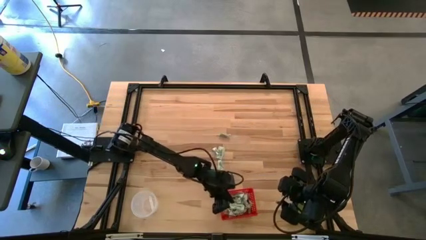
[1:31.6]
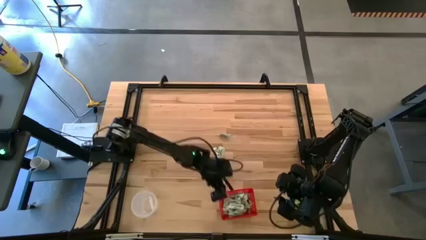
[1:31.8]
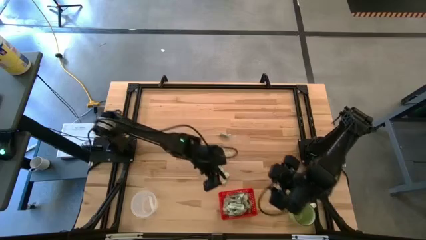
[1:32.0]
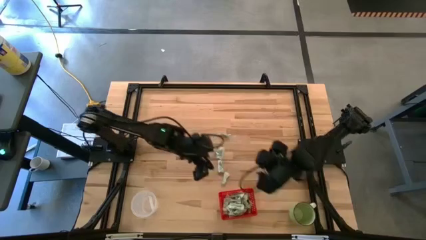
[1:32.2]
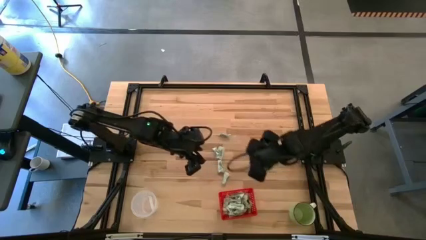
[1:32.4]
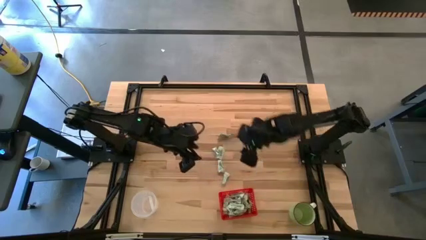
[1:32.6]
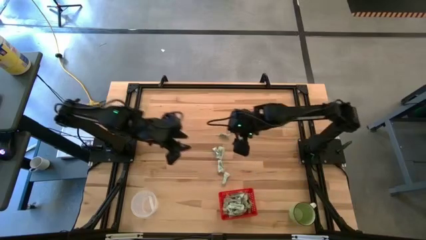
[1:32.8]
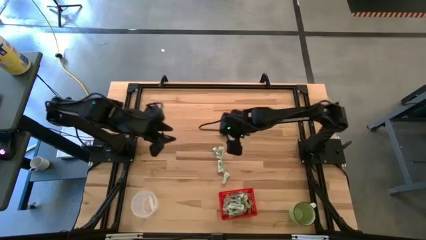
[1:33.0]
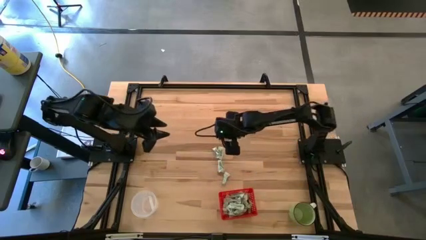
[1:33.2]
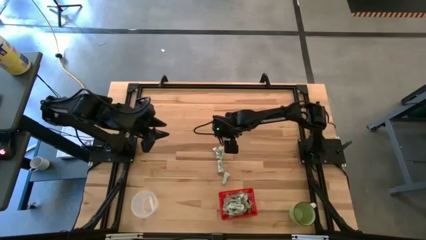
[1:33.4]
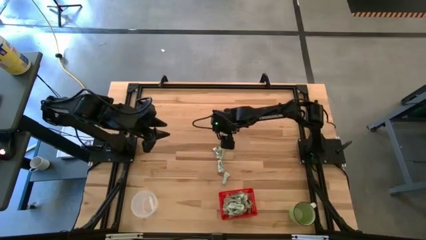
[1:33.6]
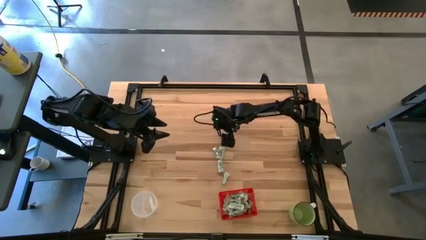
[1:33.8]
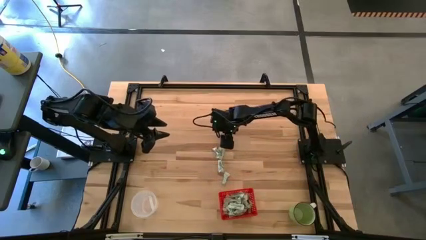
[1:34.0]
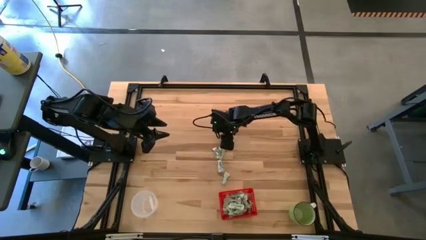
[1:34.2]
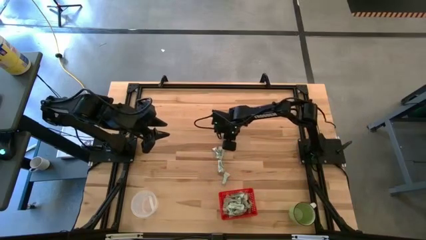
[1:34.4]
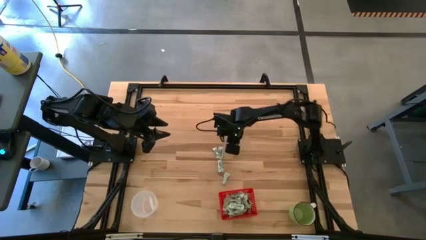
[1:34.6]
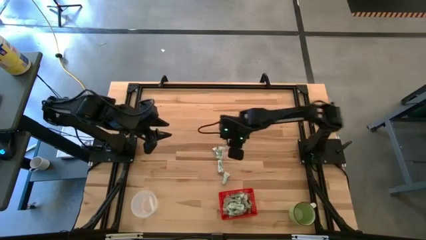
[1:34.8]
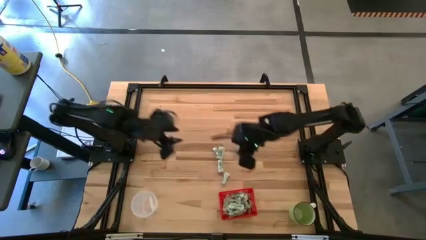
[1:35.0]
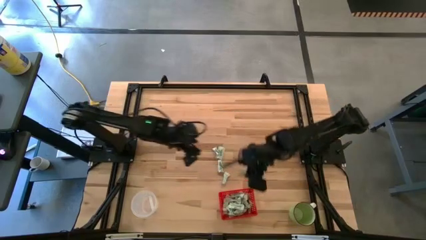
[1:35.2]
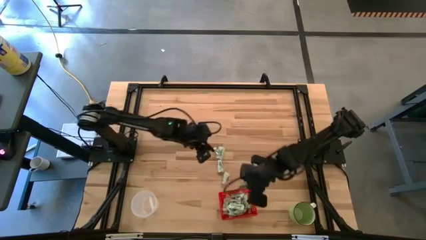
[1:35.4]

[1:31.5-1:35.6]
Task: Pick and place items into bin
Put the white stevia packet into the red bin

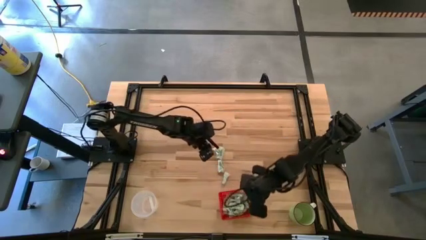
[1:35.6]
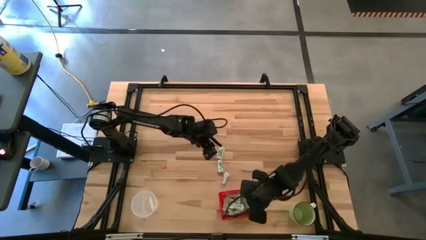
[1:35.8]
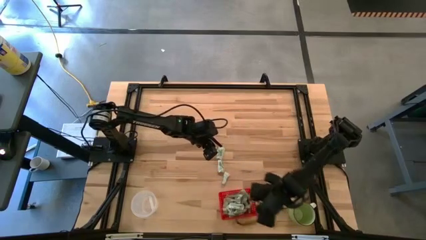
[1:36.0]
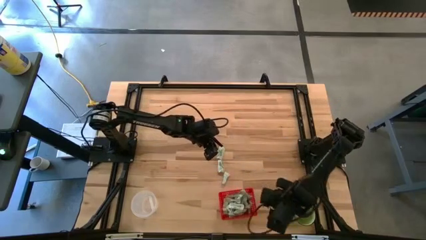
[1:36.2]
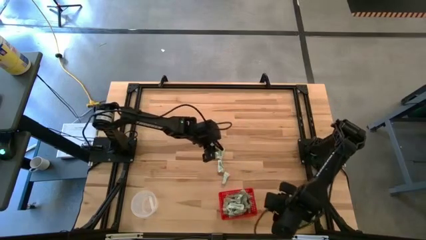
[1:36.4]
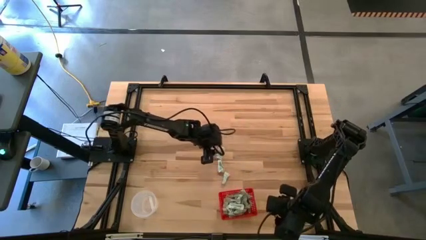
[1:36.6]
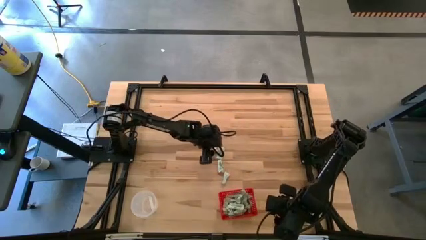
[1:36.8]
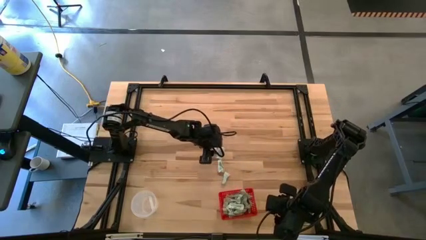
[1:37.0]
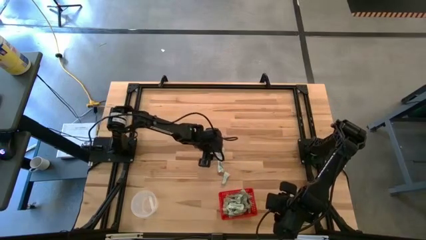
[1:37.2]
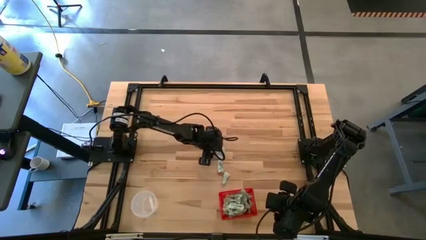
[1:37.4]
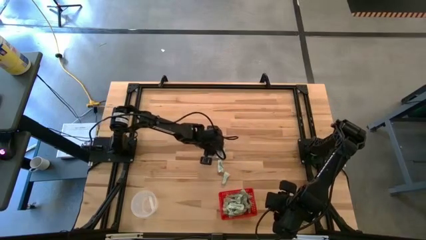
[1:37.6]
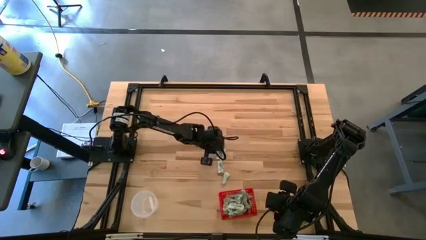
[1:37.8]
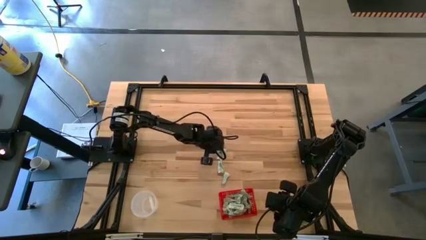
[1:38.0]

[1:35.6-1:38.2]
Put the white stevia packet into the red bin

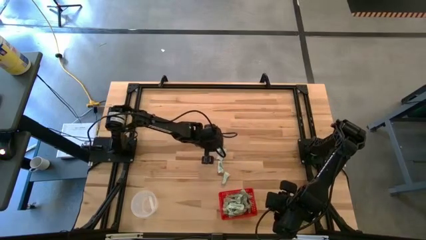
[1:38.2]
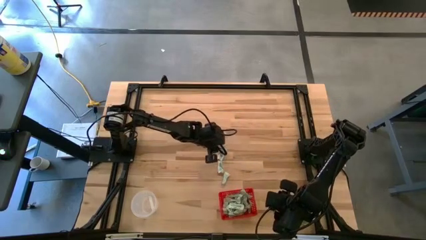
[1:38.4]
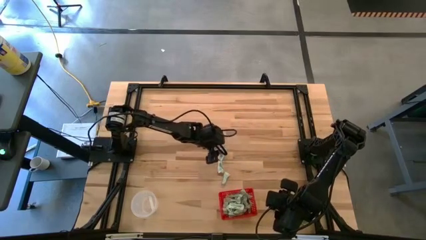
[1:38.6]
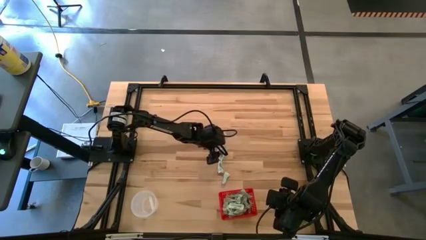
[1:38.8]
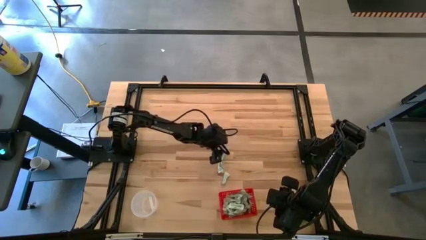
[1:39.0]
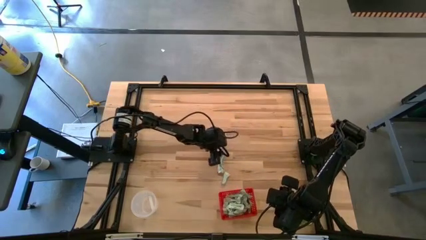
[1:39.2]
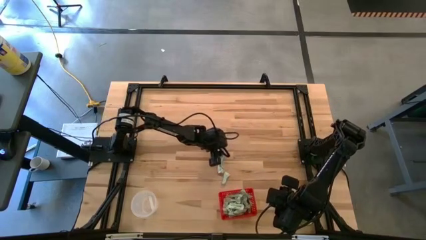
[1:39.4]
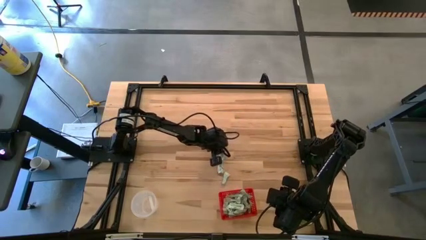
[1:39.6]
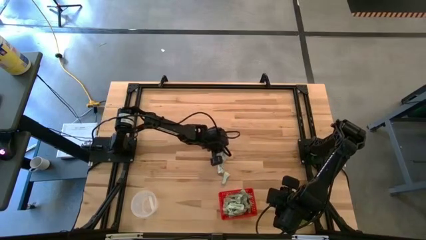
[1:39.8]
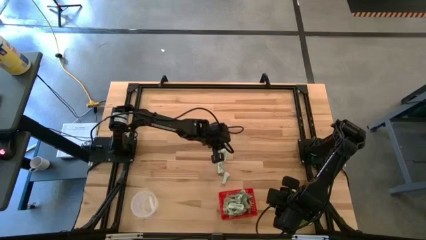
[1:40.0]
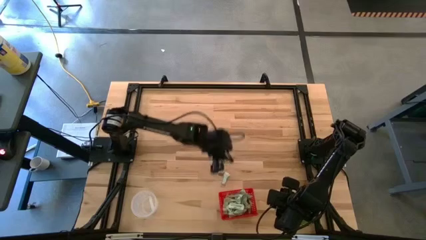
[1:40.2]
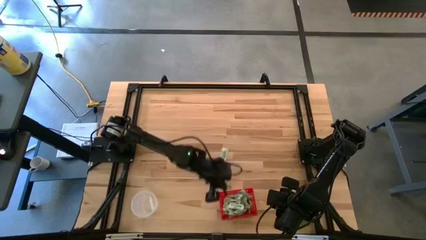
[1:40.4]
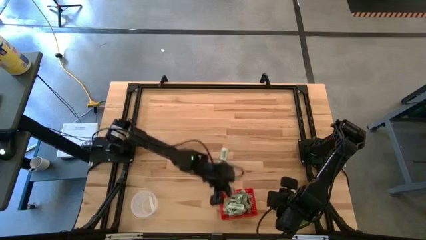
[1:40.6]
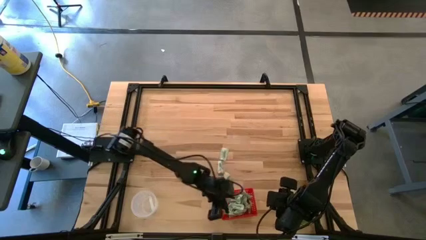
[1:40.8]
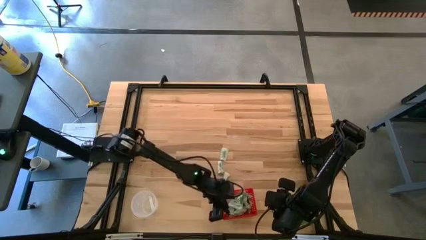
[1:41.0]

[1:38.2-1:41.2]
Put the white stevia packet into the red bin

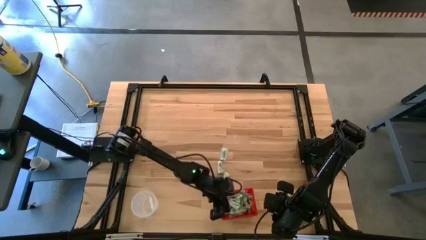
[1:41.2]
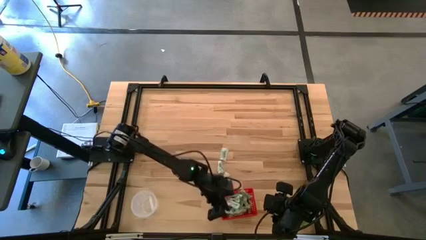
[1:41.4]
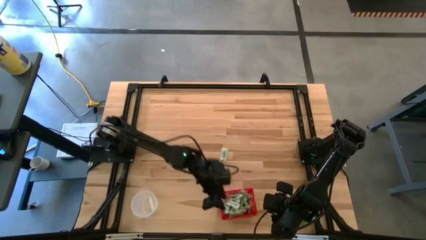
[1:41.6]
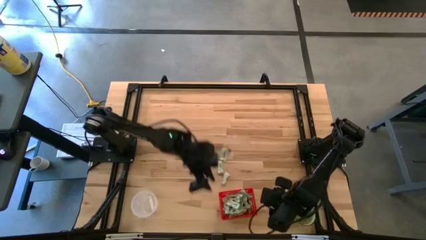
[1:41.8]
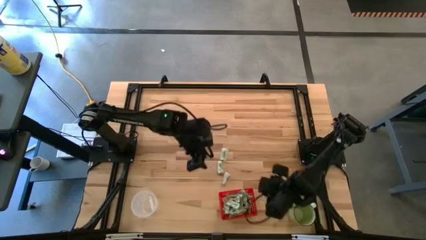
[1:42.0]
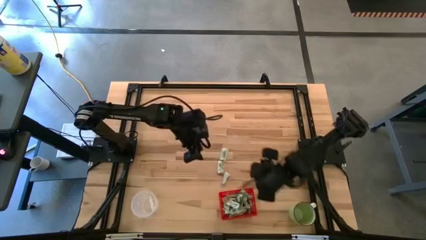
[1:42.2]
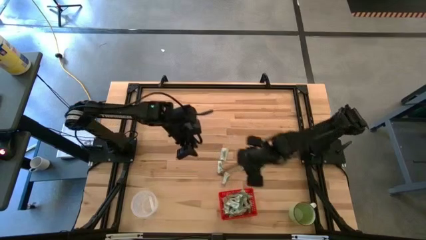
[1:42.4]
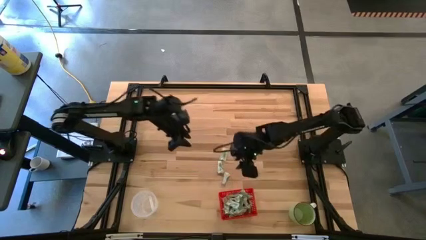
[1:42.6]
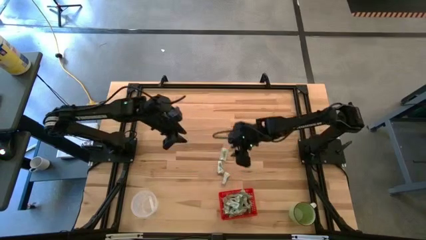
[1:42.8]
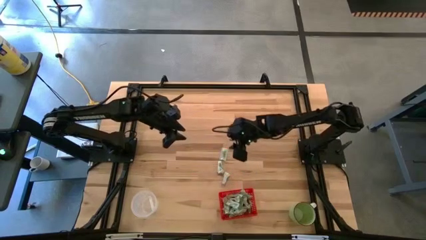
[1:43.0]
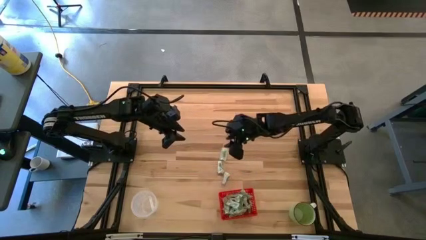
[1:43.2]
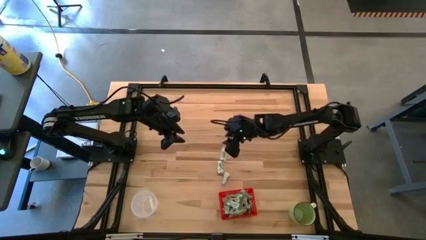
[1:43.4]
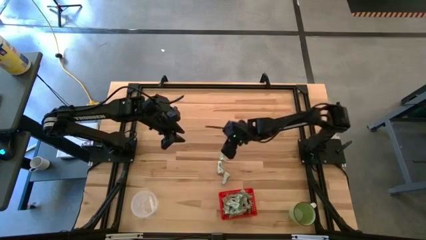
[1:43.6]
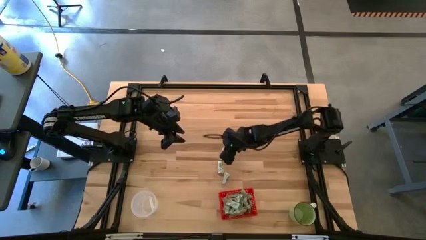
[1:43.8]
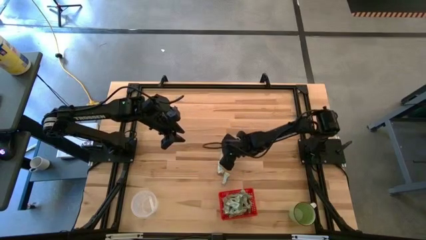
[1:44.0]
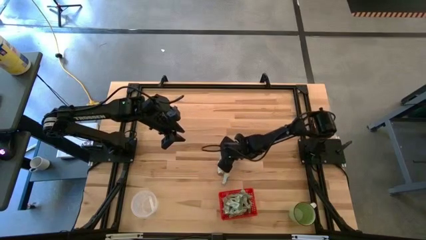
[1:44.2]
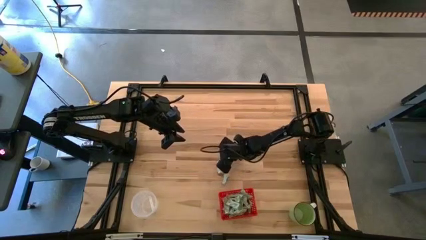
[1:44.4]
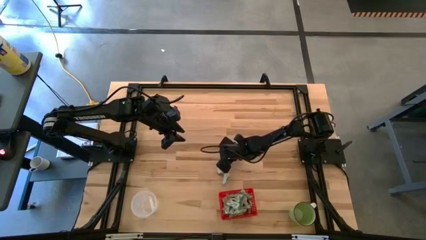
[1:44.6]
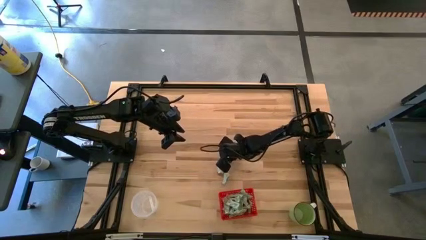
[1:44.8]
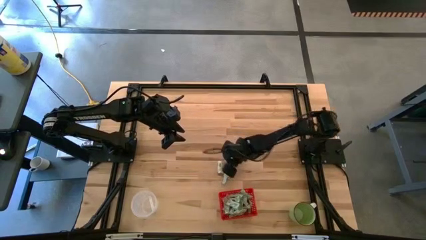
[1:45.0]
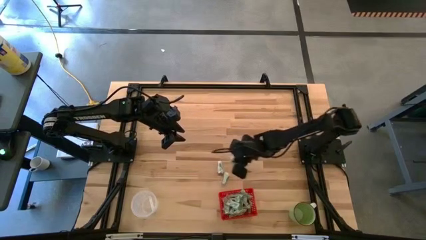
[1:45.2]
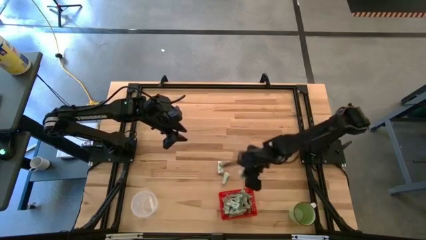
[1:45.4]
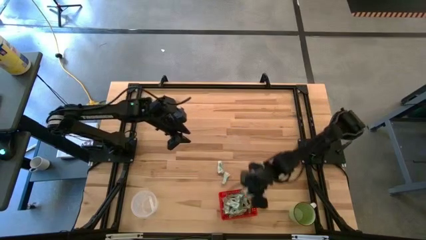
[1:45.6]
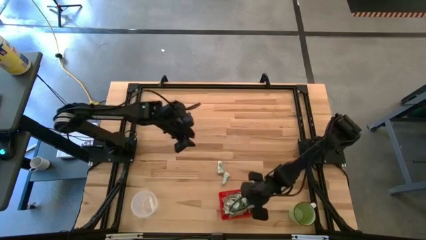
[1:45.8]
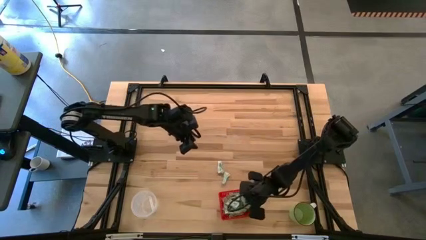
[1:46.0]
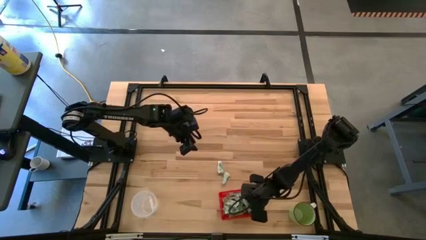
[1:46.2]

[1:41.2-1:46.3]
Put the top white stevia packet into the red bin

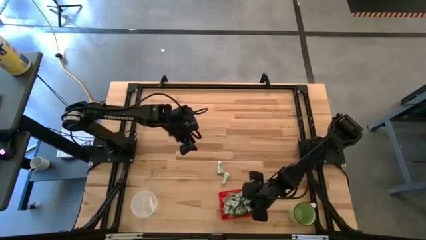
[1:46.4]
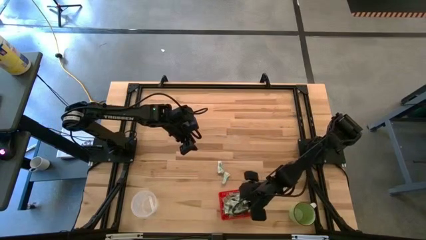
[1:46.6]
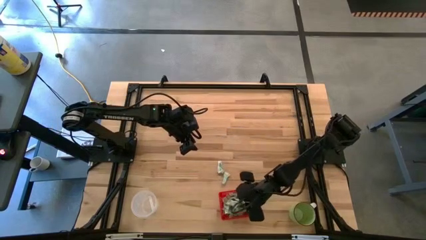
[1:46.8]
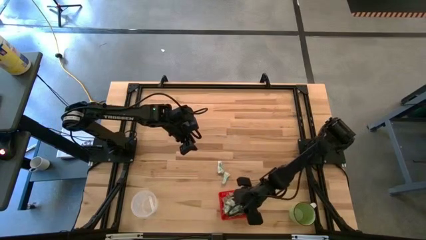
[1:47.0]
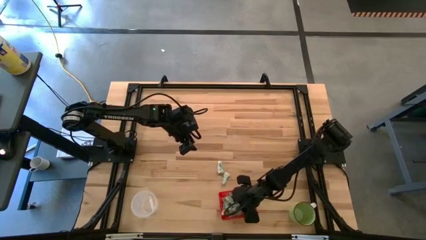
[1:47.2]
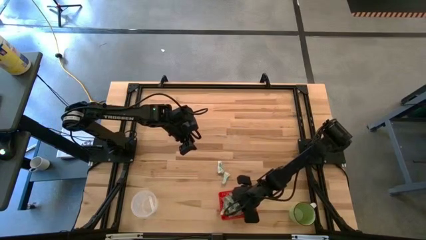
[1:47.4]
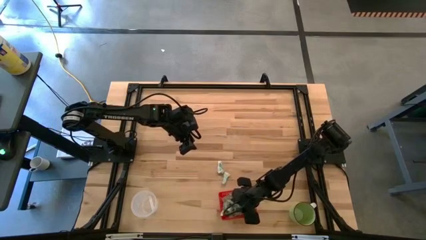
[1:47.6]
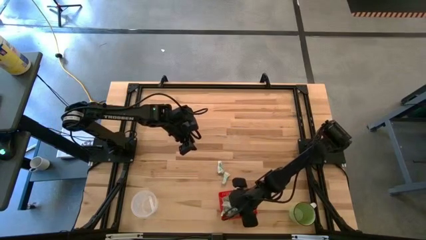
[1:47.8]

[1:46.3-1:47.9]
Adjust the stevia packets in the red bin
